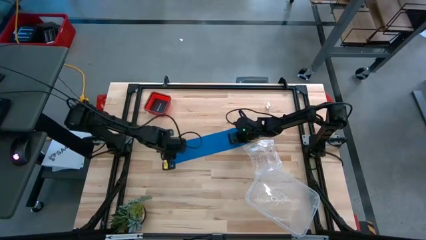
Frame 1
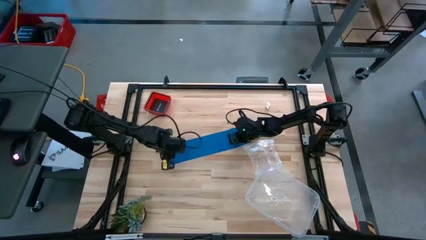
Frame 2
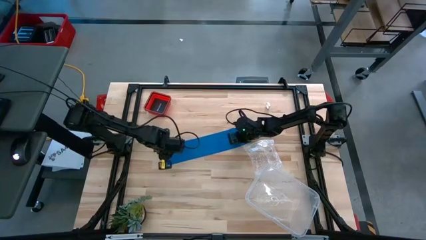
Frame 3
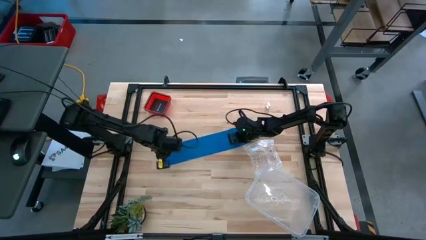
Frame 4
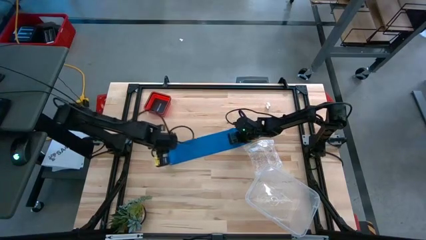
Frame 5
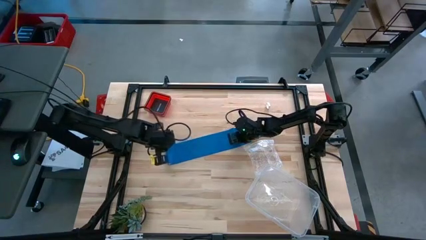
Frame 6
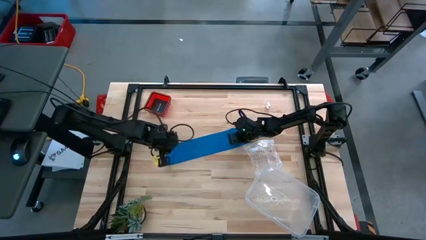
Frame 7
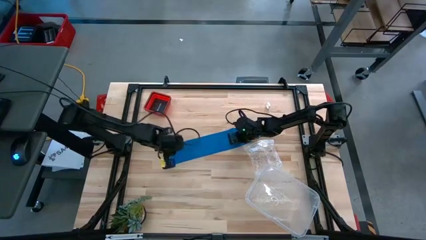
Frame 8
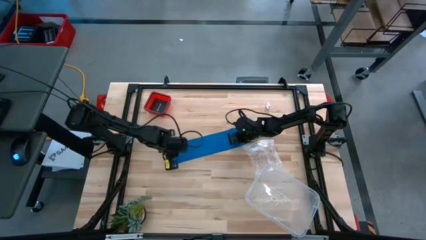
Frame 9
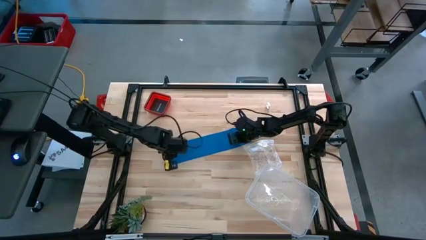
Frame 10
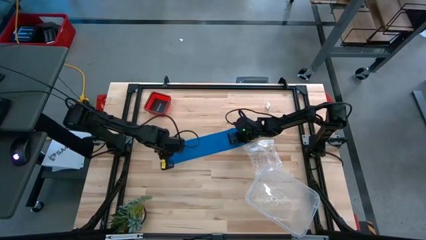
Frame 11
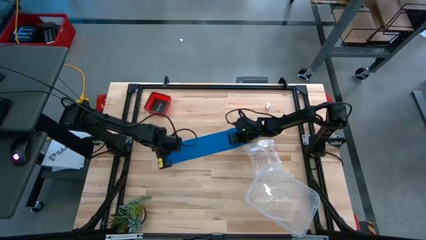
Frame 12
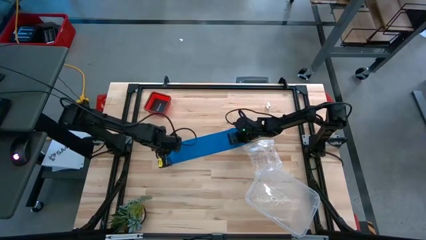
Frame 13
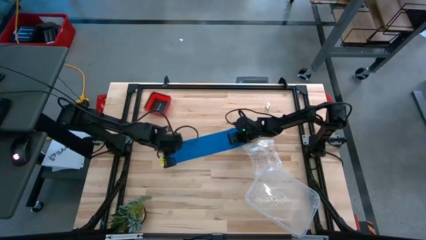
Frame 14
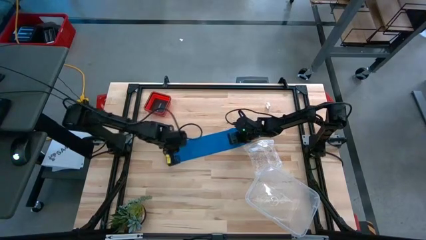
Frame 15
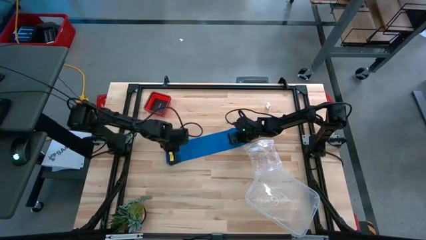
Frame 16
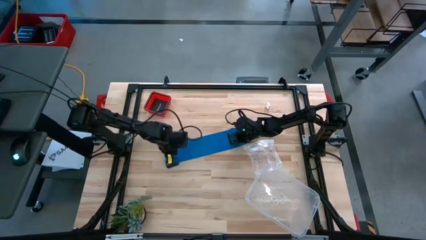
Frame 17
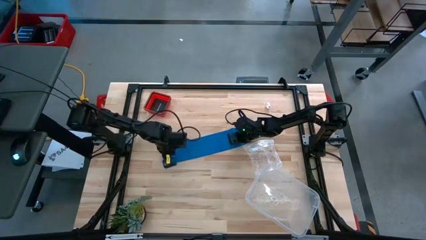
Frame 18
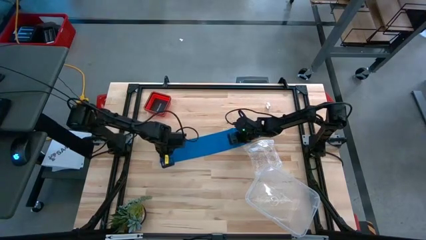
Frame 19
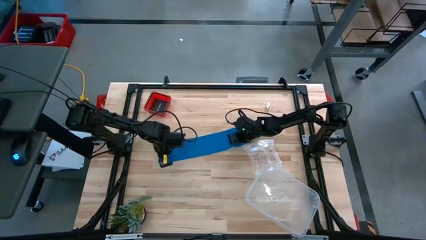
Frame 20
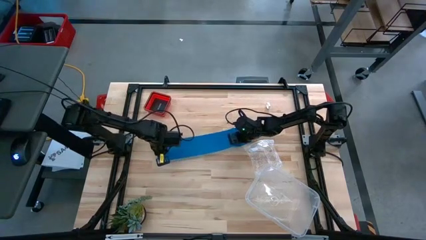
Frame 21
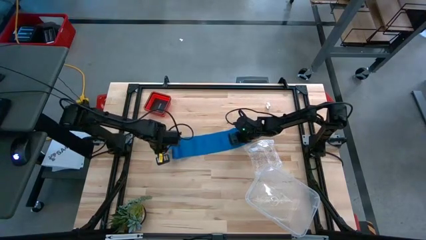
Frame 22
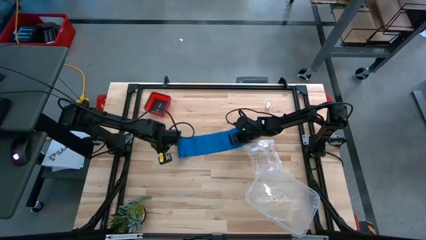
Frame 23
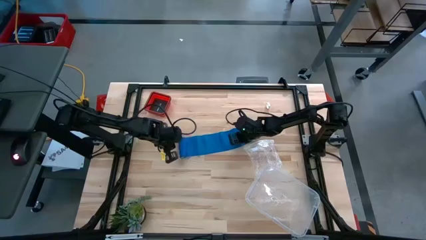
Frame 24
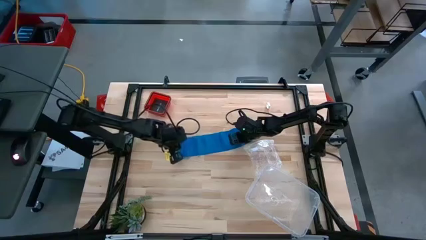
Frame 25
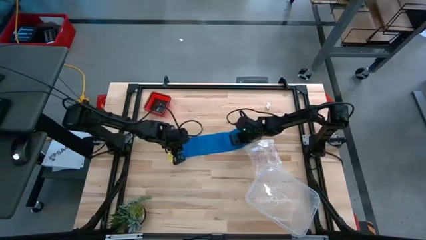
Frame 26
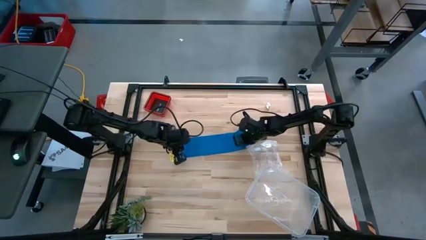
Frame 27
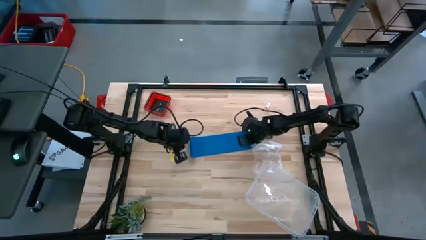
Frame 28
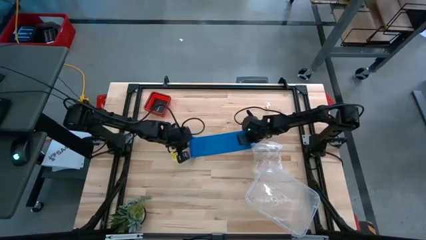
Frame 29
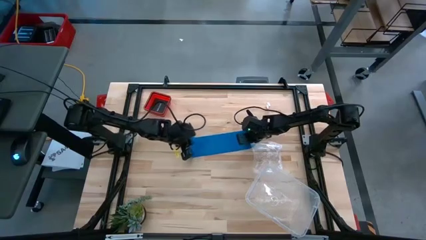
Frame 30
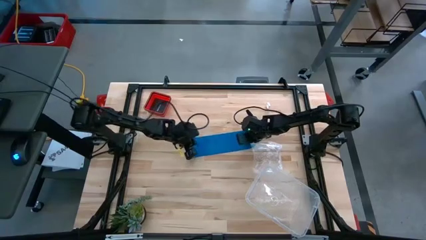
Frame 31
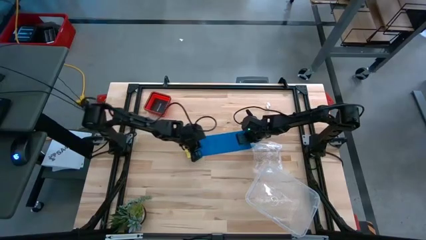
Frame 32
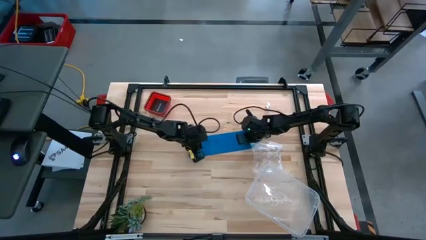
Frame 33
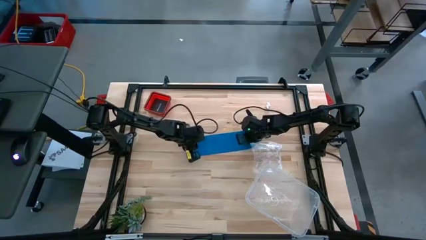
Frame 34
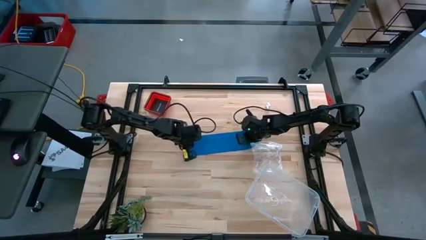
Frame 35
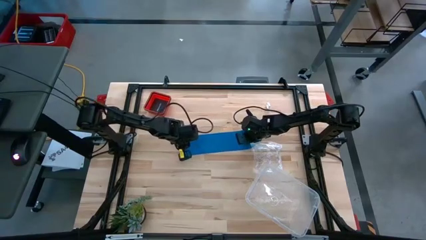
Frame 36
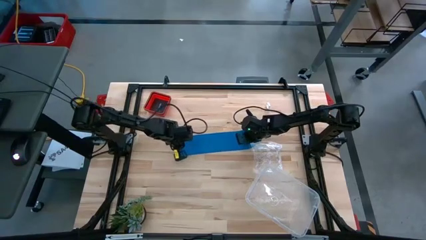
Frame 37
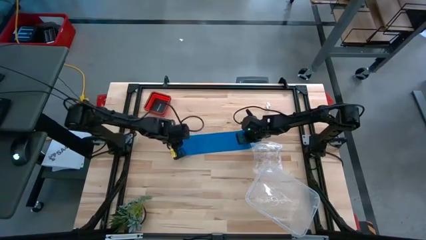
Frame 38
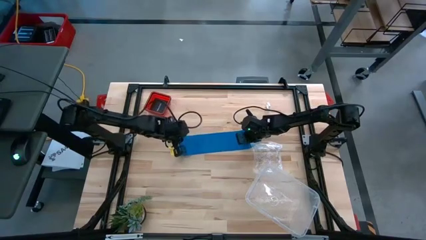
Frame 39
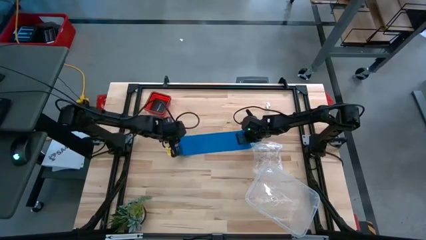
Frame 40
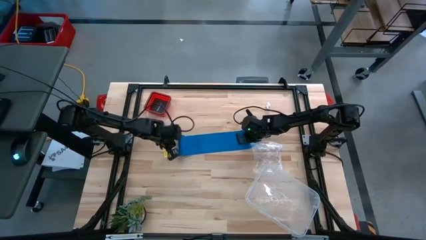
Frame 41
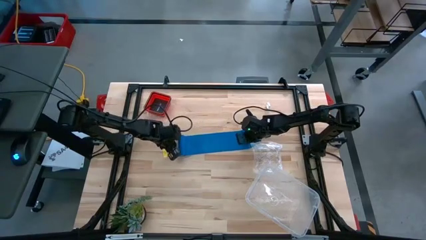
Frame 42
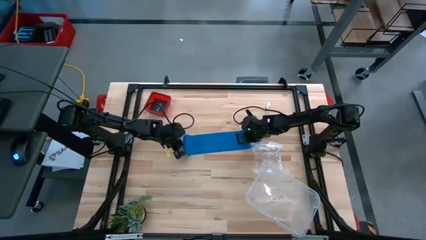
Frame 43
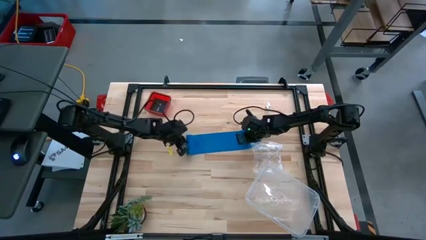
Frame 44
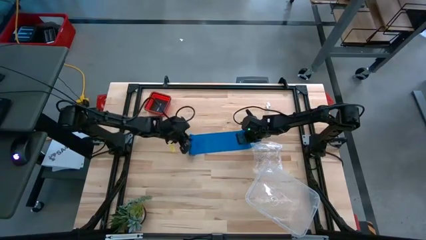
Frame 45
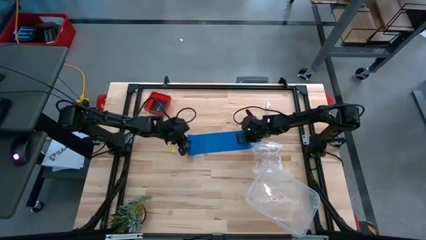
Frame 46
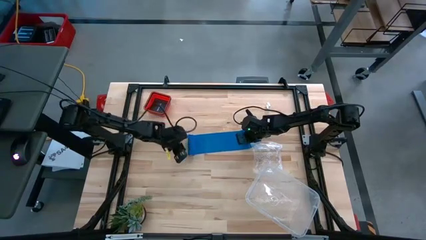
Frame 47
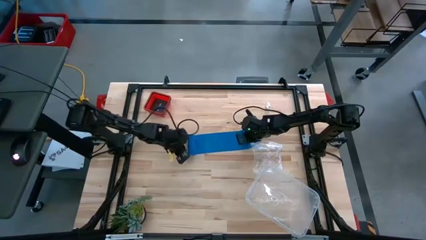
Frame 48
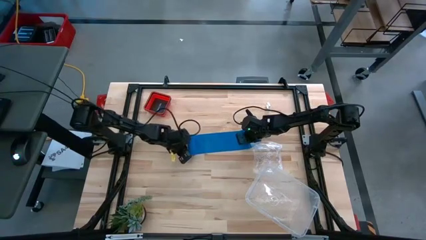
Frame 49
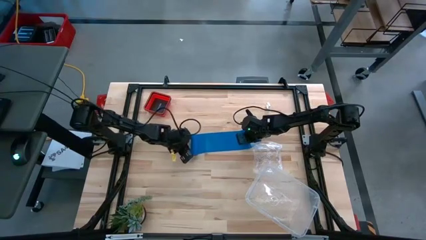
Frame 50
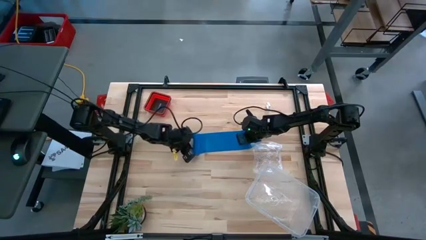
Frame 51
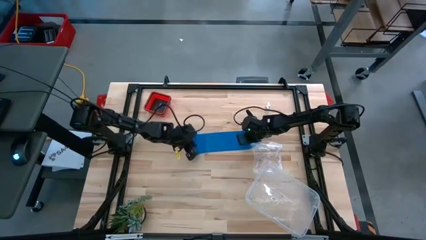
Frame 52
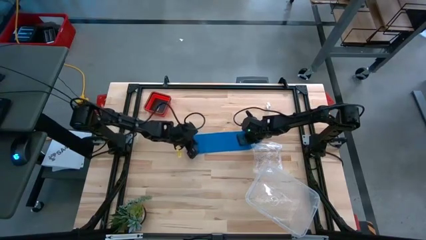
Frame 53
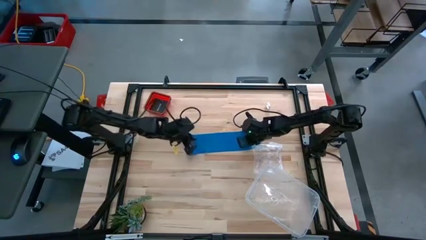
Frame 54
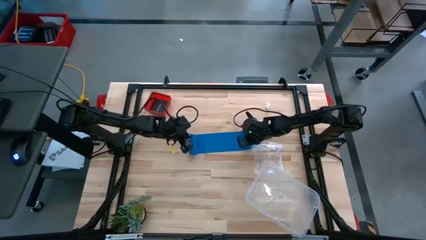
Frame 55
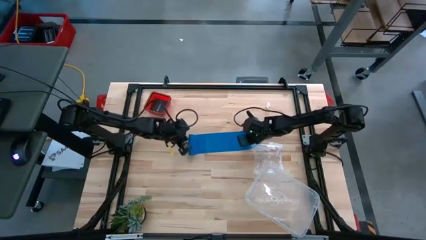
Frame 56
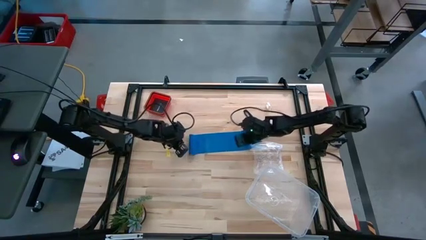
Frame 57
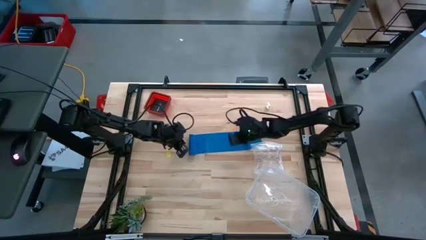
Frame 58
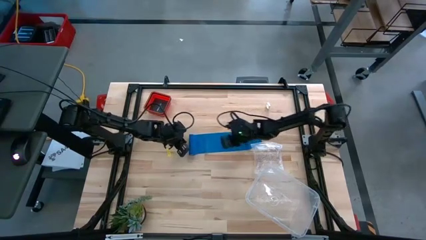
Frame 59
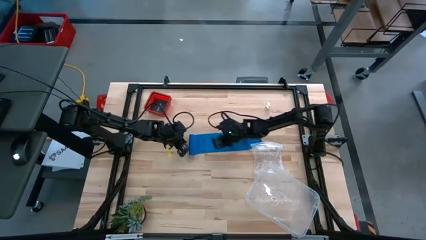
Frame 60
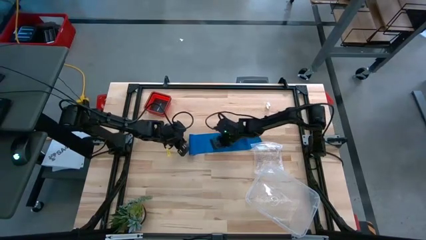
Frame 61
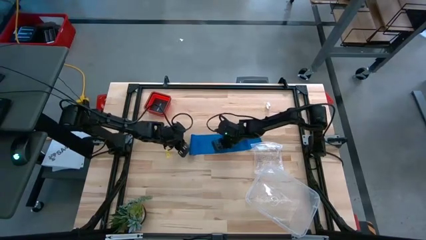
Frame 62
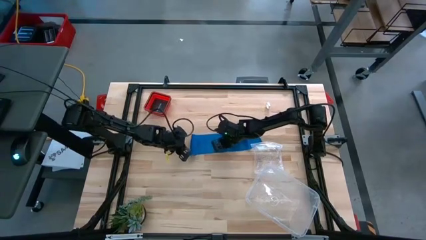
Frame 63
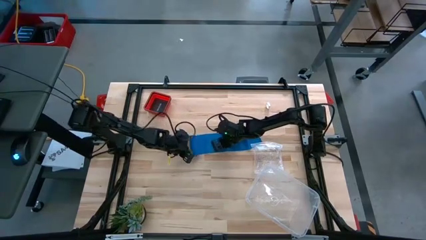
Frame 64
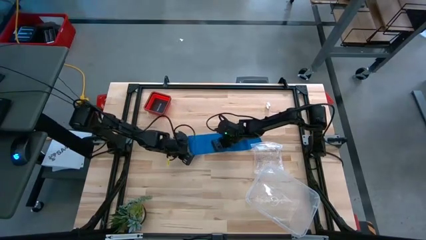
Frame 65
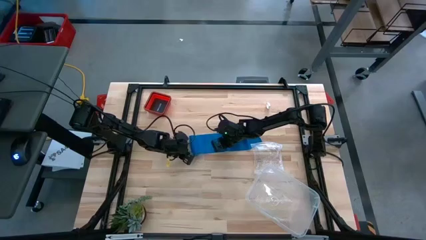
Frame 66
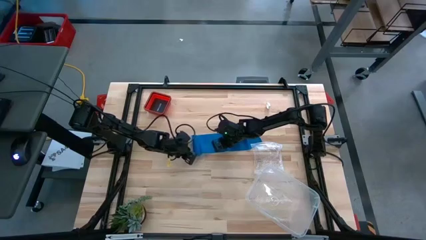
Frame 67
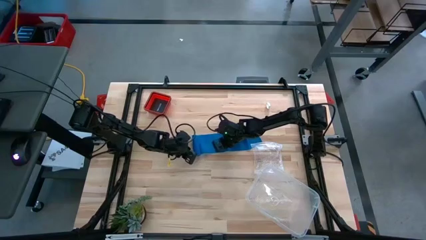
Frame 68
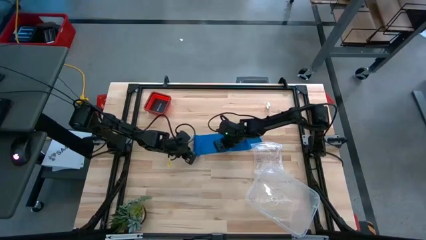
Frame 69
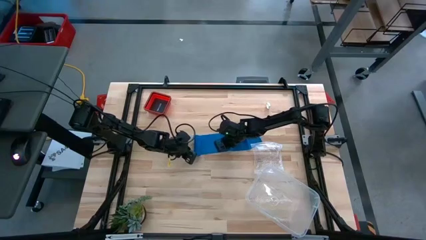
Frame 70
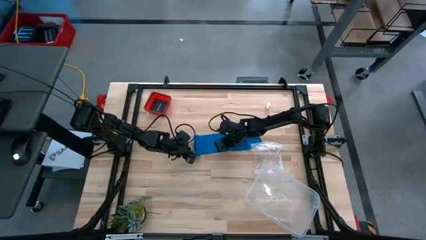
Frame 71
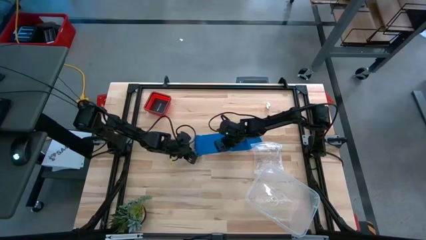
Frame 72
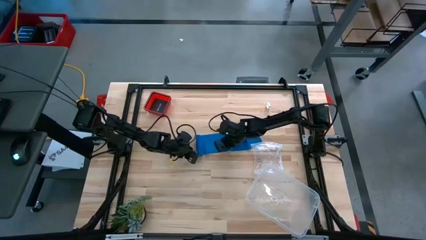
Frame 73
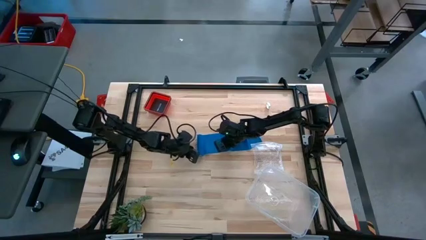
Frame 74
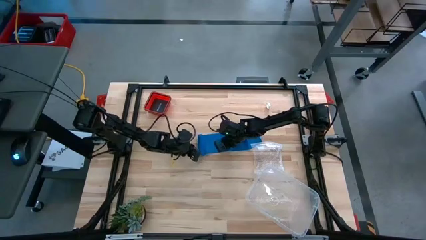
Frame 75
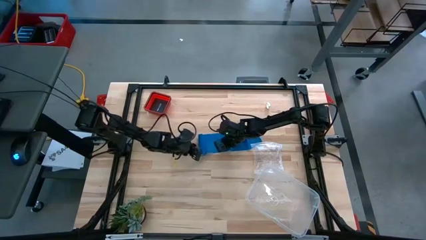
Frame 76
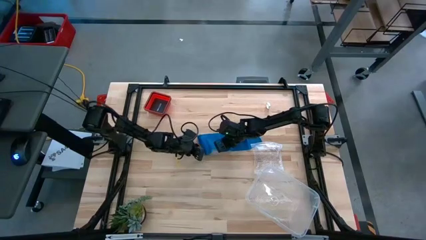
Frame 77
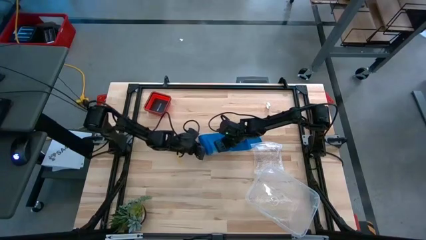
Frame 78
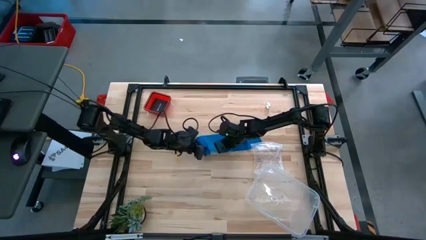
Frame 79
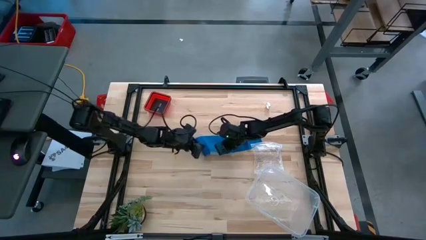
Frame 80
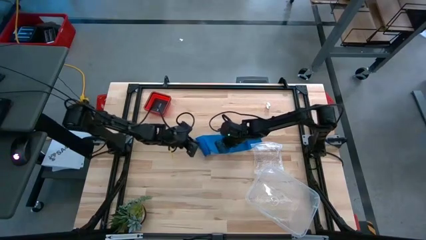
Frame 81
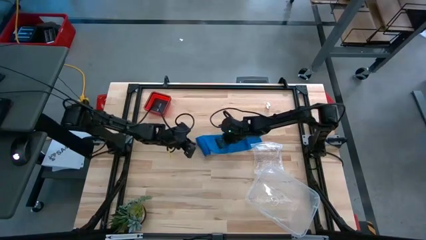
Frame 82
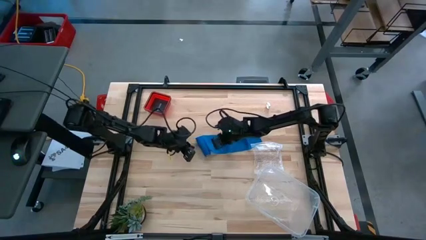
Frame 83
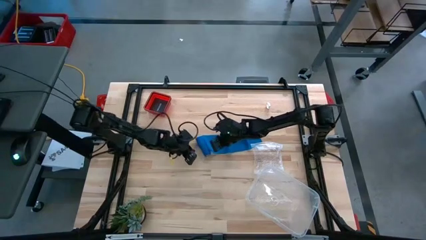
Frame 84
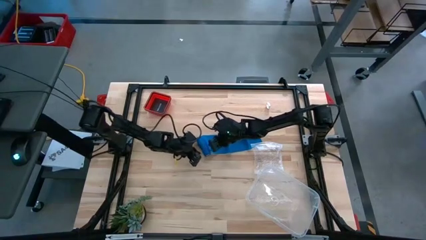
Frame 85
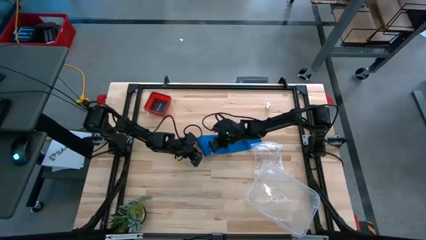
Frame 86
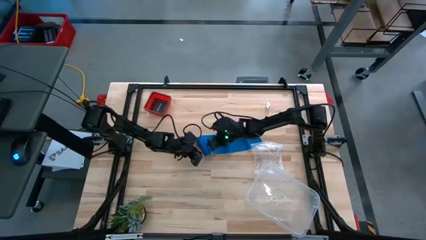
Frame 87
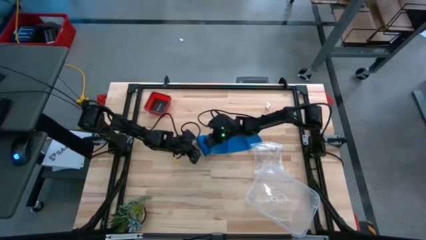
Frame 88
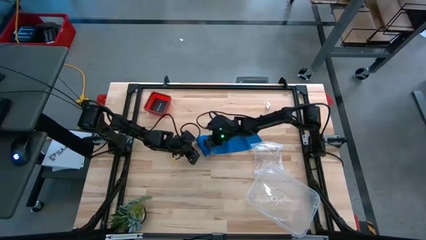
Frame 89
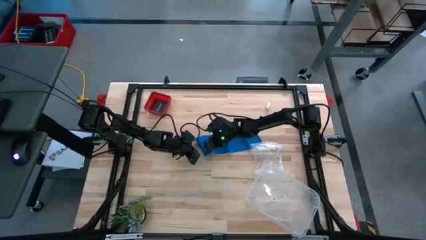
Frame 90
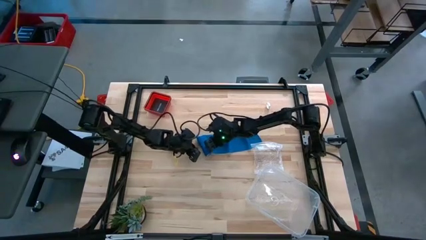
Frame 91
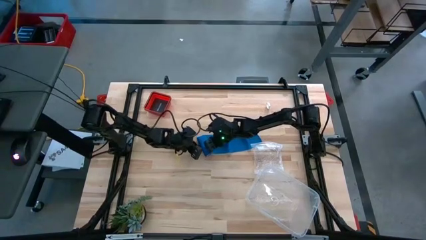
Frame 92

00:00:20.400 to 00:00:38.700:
Task: Roll bandage
Roll the blue bandage
